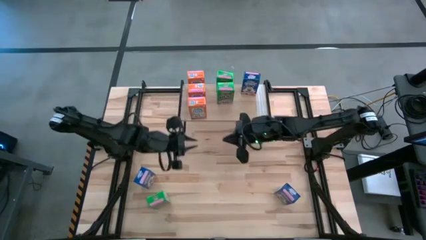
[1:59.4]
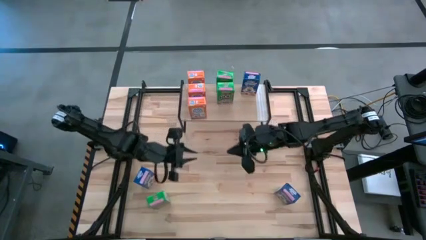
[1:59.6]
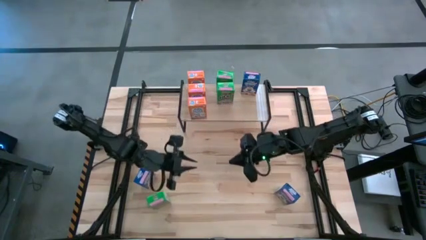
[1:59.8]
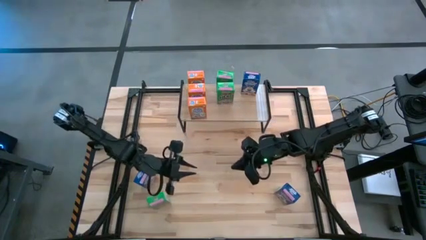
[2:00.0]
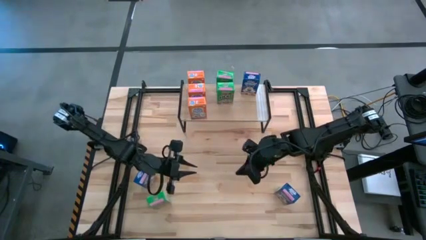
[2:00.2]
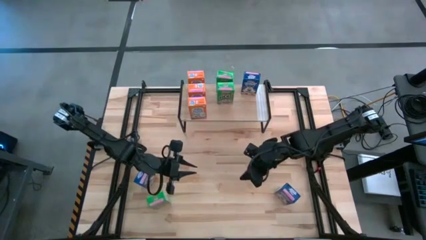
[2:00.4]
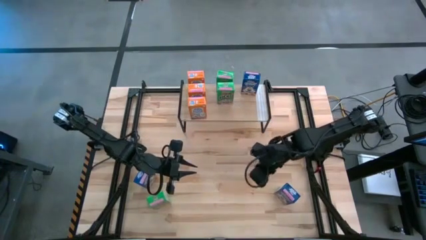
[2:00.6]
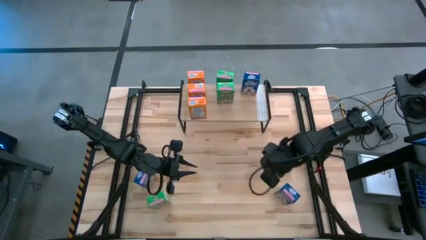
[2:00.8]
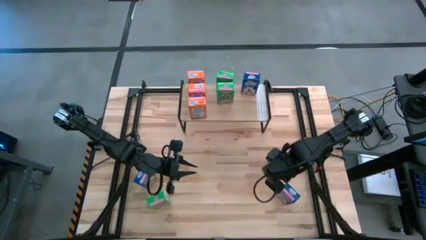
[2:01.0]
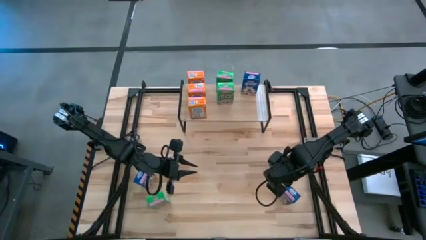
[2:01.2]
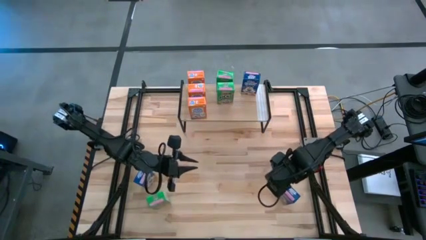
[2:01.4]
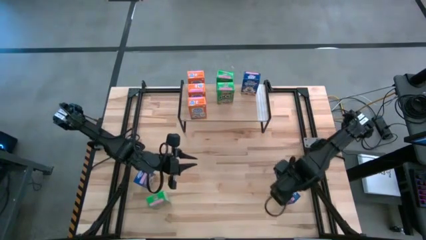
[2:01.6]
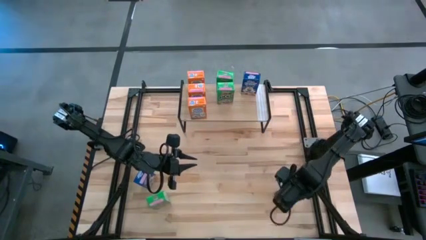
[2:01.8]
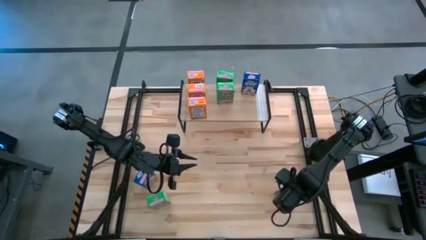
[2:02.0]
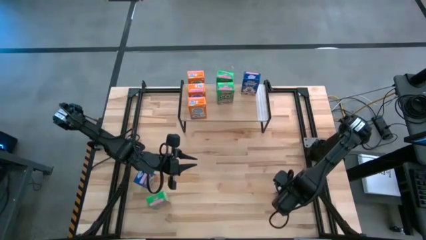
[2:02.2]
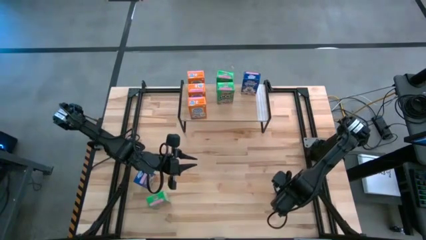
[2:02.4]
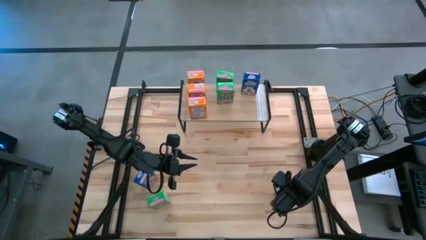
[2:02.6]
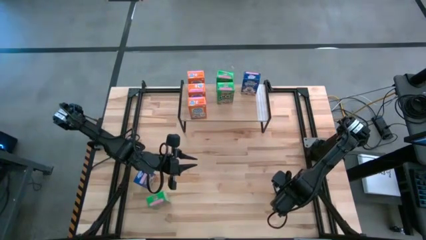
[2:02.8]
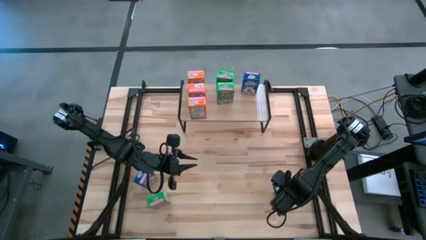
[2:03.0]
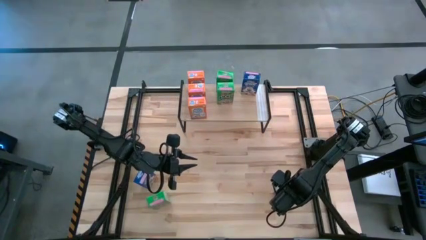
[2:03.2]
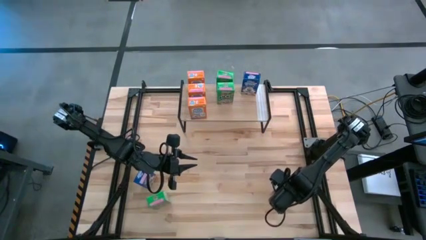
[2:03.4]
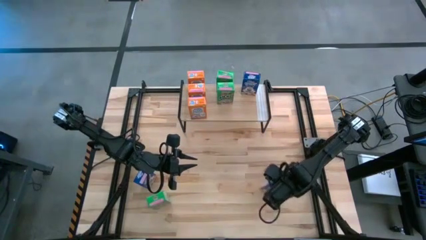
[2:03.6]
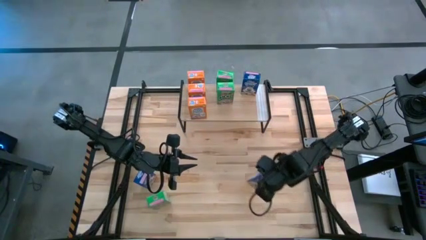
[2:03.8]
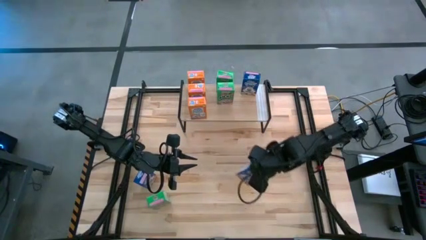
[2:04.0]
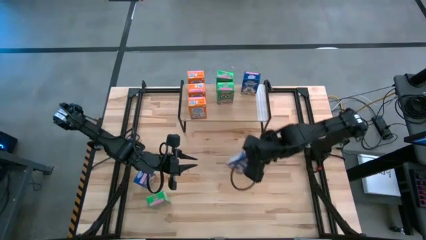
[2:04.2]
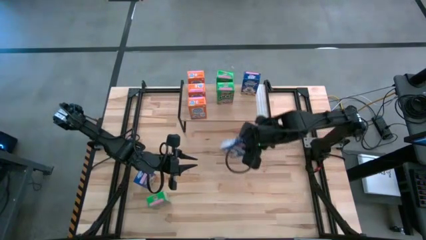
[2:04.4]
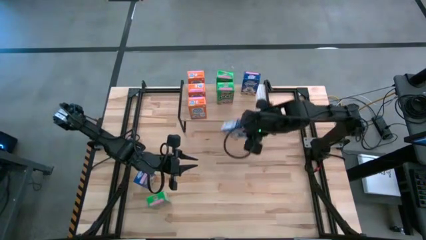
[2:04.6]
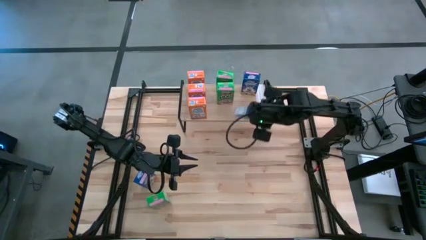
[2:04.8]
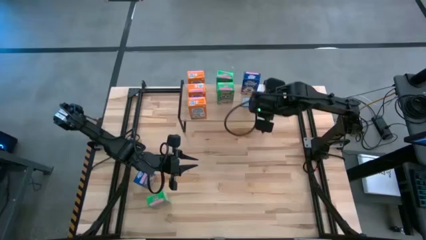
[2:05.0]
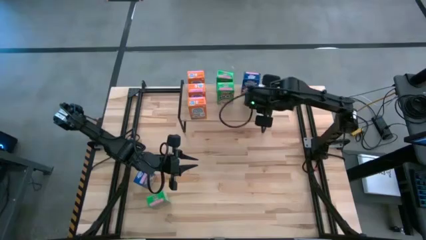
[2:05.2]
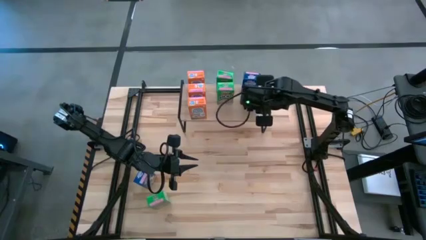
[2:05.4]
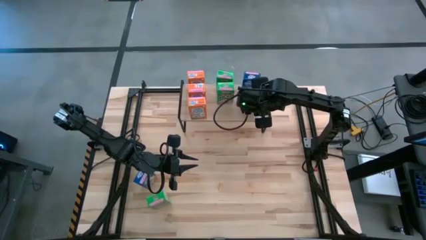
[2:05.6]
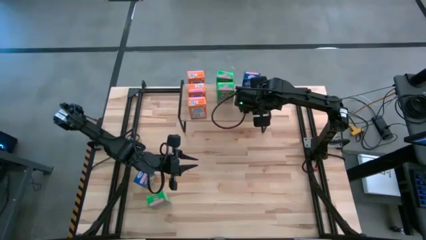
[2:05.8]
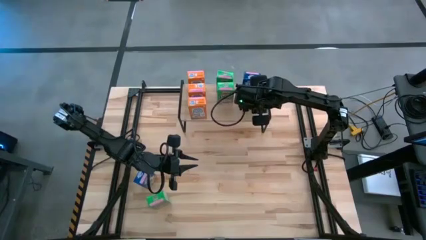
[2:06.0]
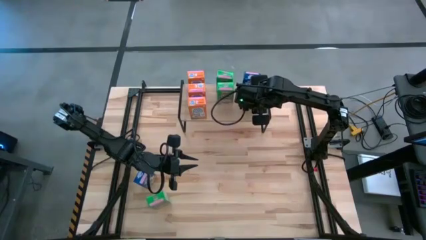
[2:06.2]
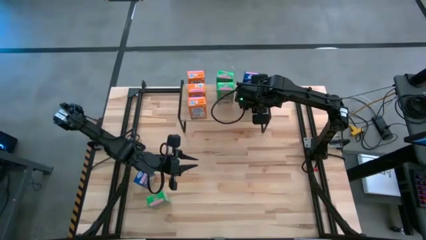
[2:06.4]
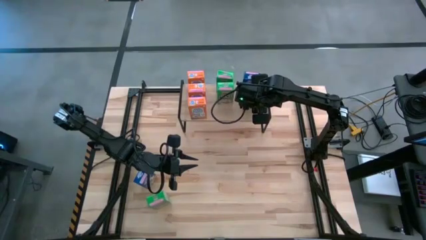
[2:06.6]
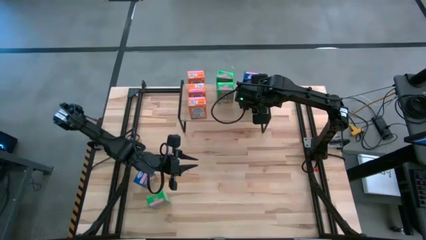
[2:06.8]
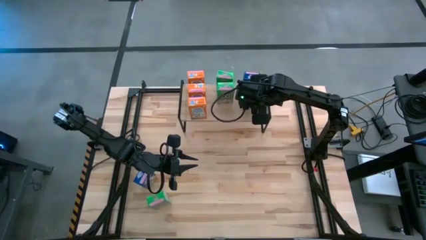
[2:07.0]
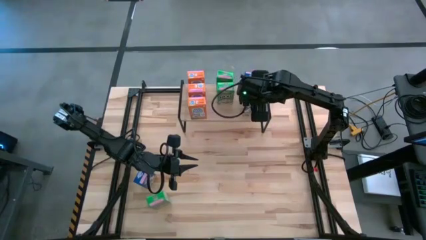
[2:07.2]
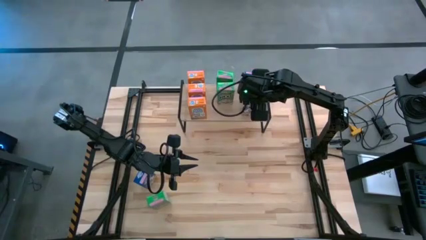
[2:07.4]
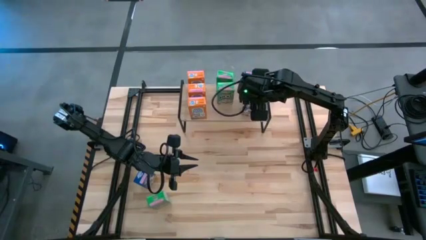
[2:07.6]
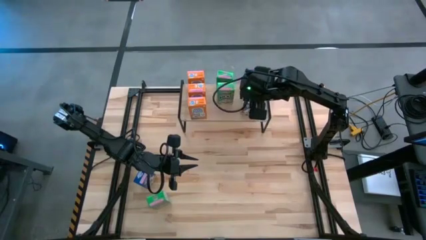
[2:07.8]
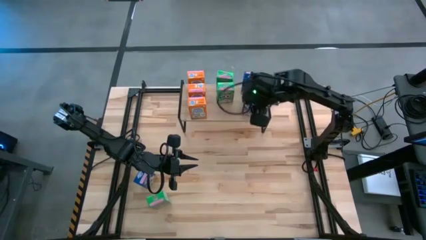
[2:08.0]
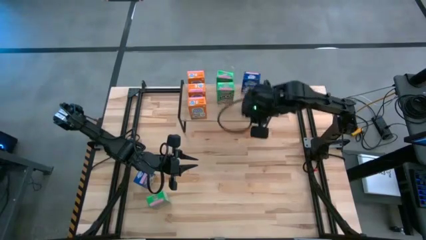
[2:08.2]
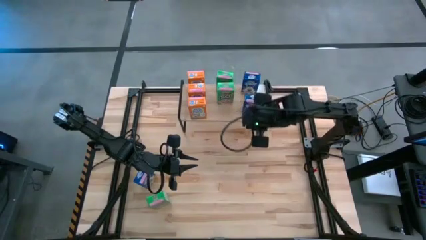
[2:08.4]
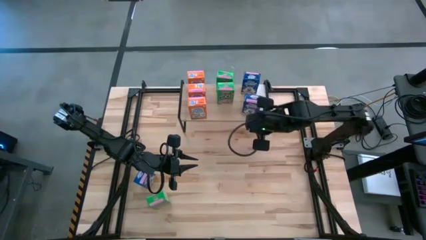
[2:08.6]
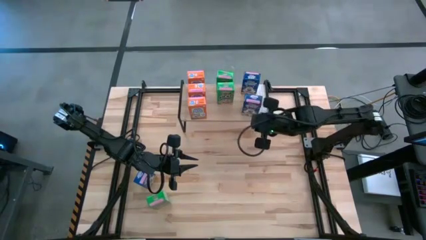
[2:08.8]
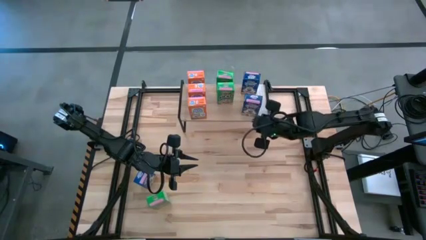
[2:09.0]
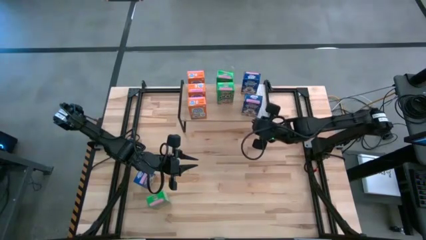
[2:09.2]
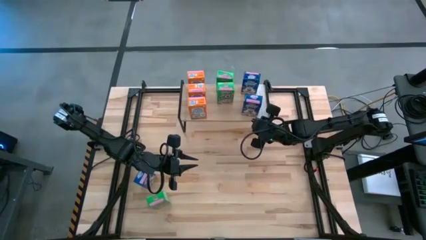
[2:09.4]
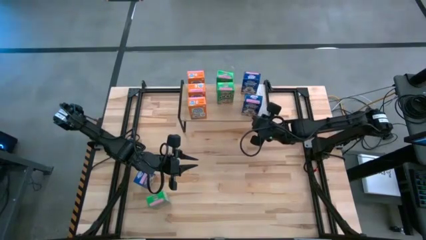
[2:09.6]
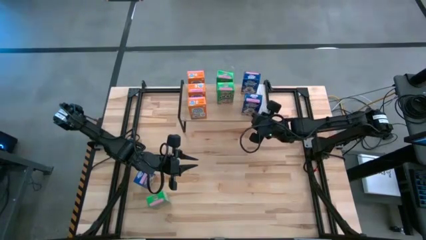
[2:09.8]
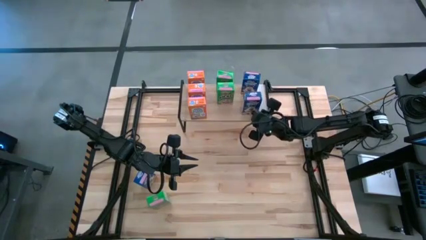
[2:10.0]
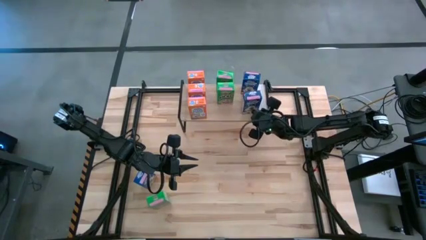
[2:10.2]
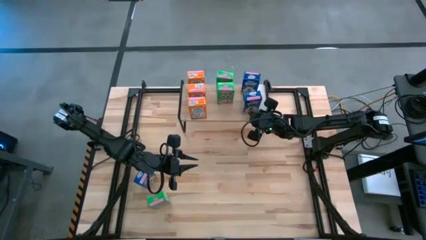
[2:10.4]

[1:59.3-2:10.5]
Task: Stack cereal on shelf
Put the right blue cereal box aligned with the other blue cereal box on the shelf
